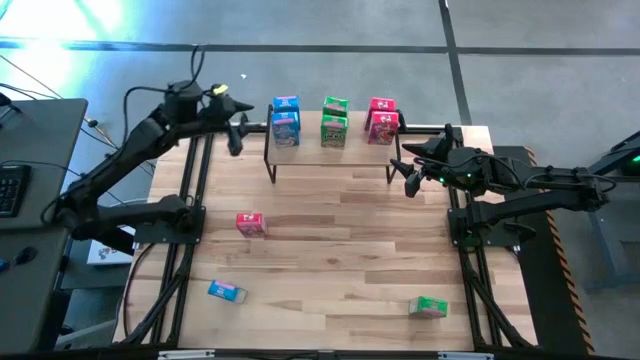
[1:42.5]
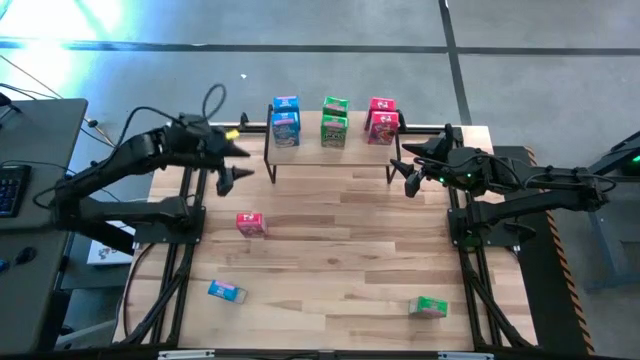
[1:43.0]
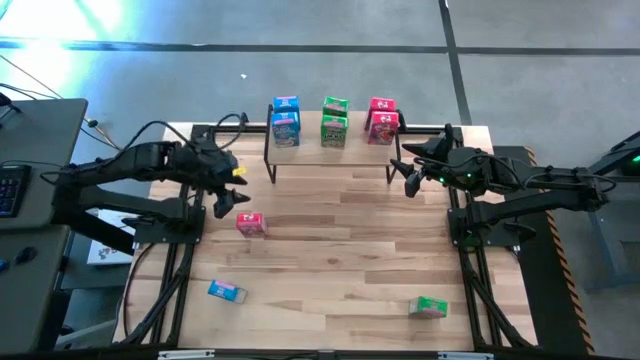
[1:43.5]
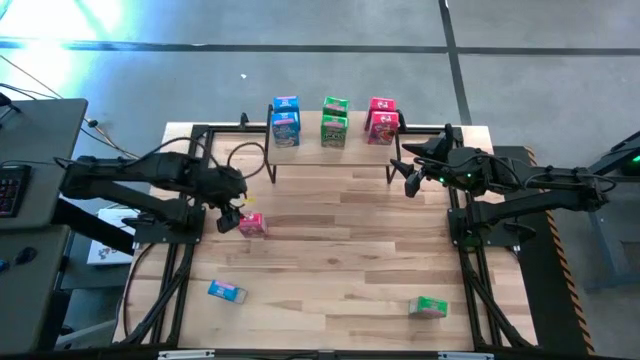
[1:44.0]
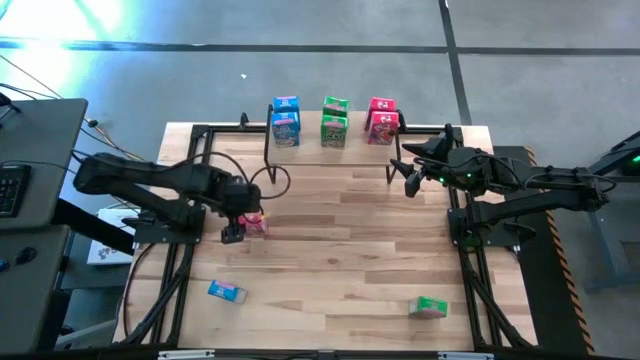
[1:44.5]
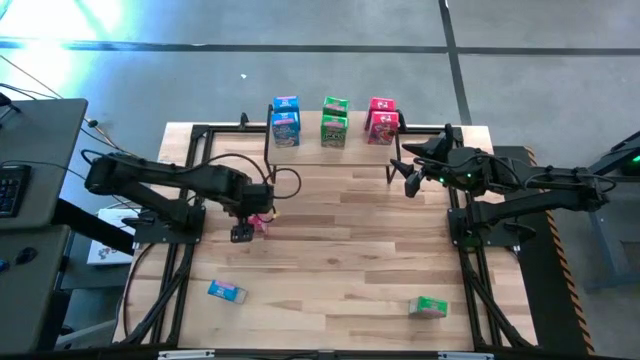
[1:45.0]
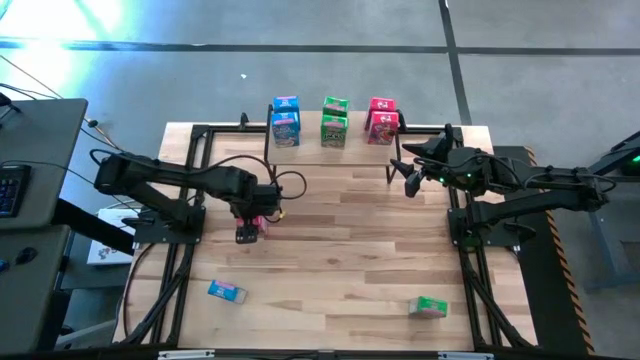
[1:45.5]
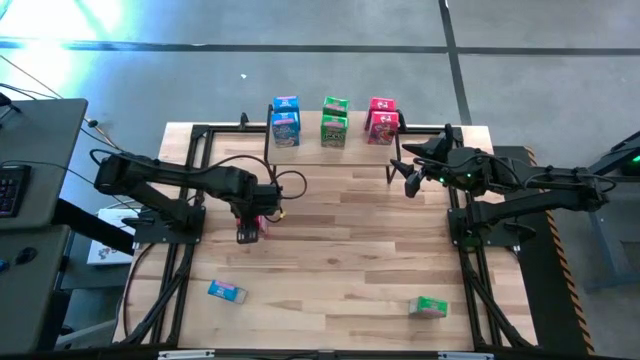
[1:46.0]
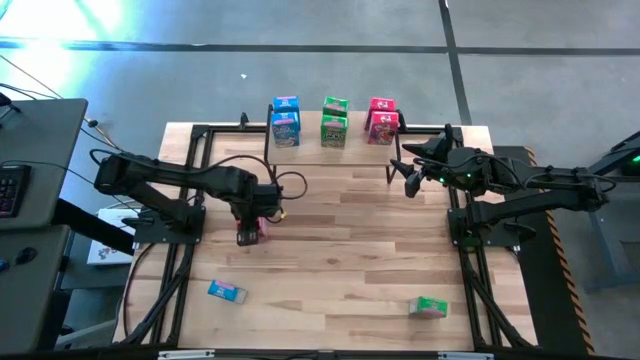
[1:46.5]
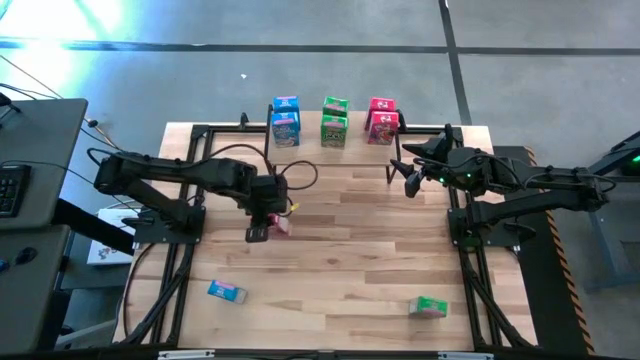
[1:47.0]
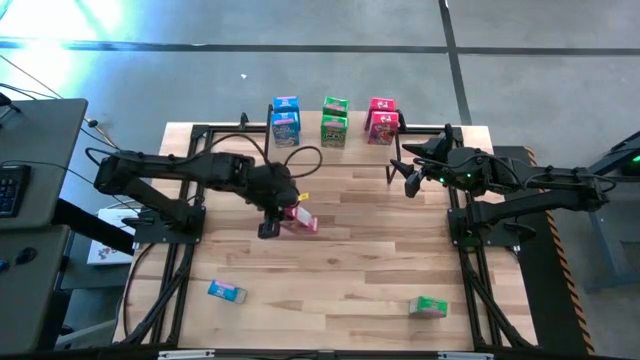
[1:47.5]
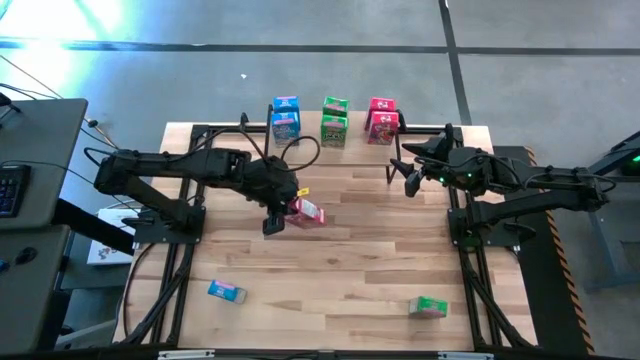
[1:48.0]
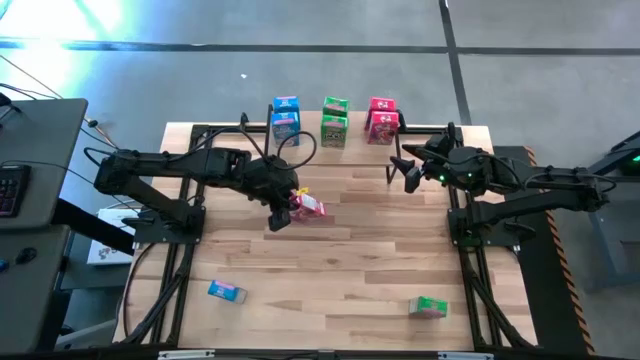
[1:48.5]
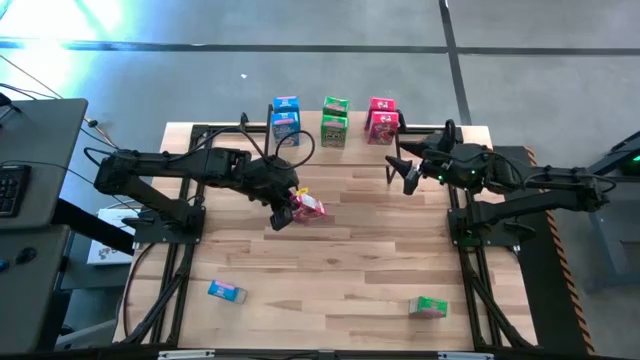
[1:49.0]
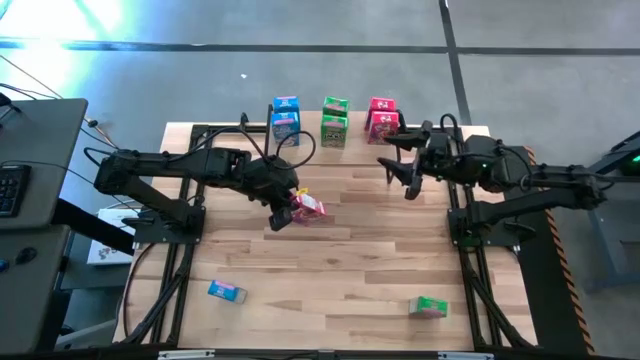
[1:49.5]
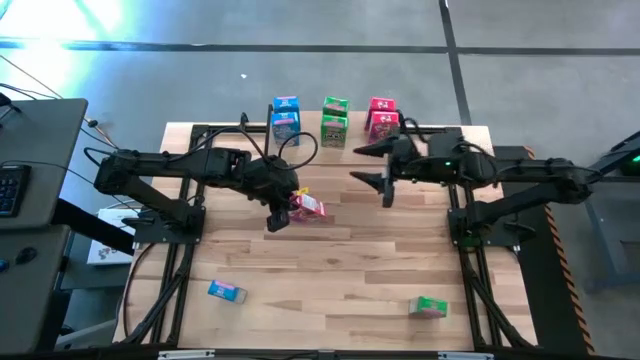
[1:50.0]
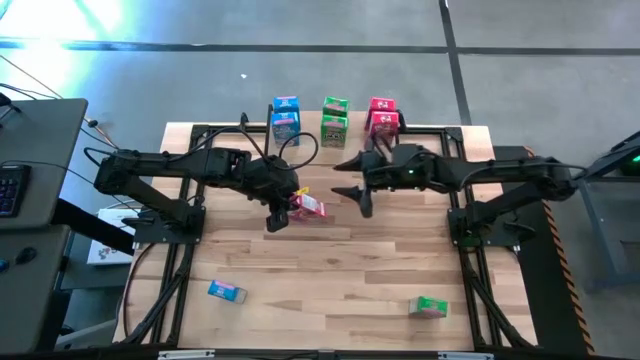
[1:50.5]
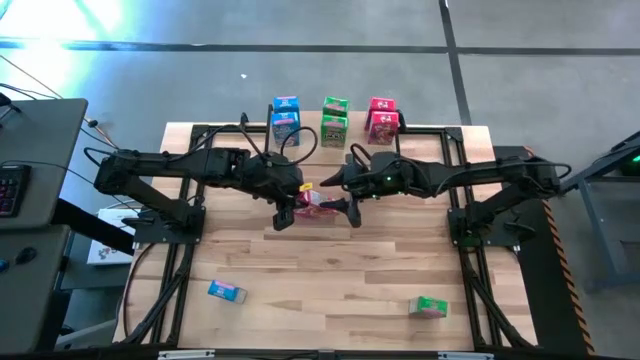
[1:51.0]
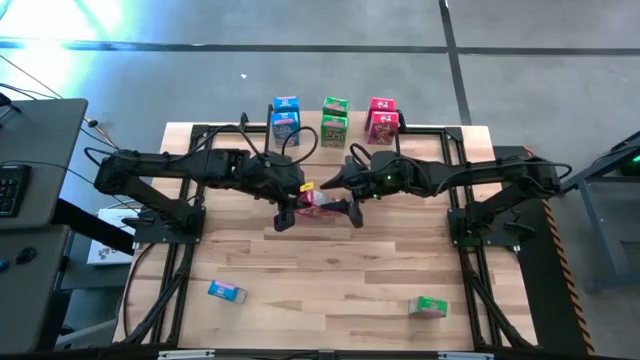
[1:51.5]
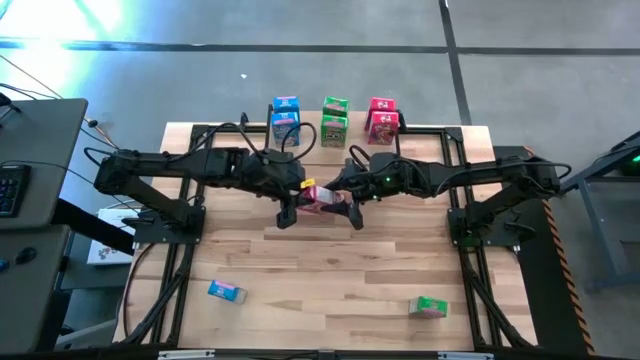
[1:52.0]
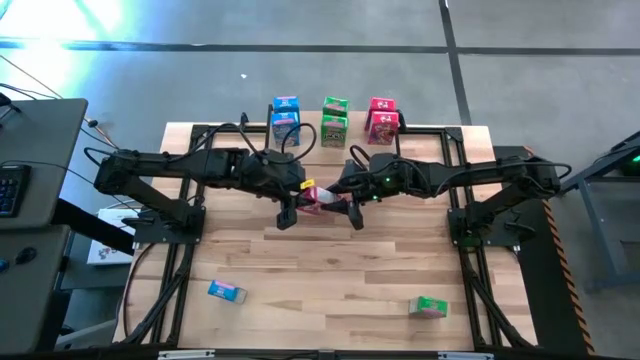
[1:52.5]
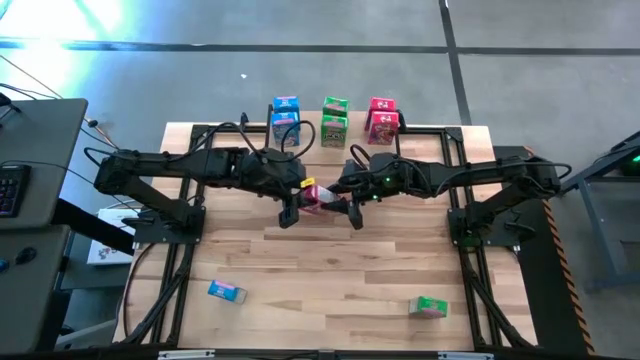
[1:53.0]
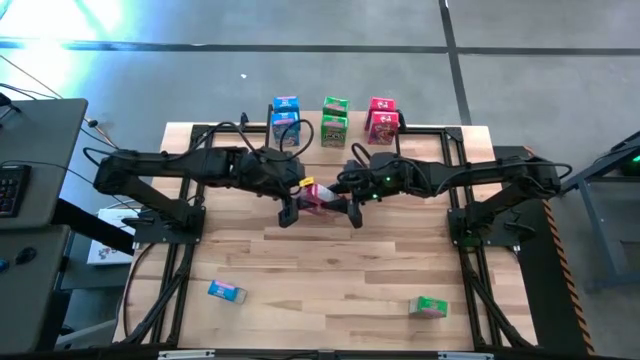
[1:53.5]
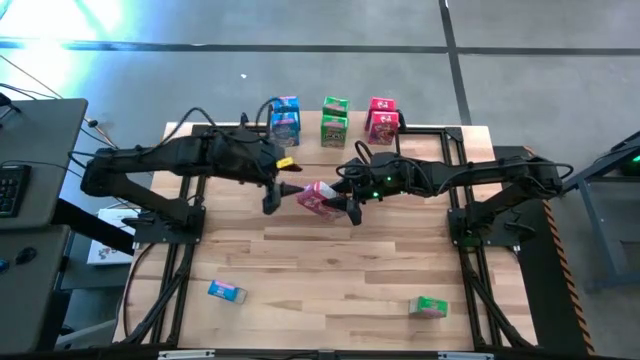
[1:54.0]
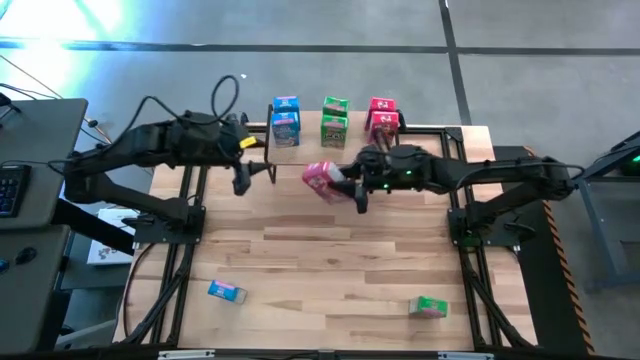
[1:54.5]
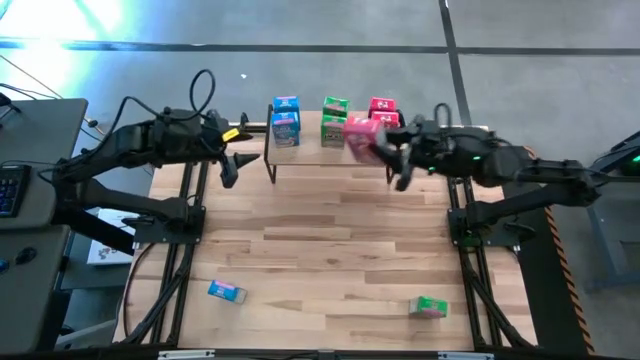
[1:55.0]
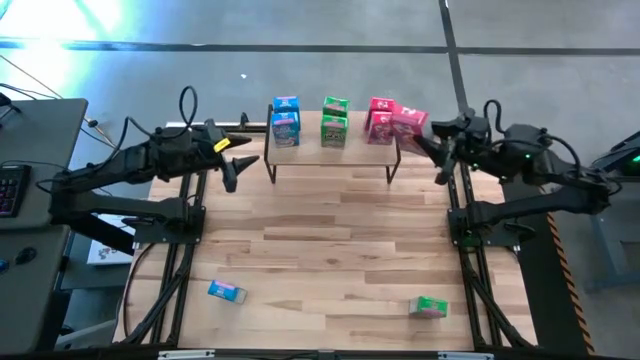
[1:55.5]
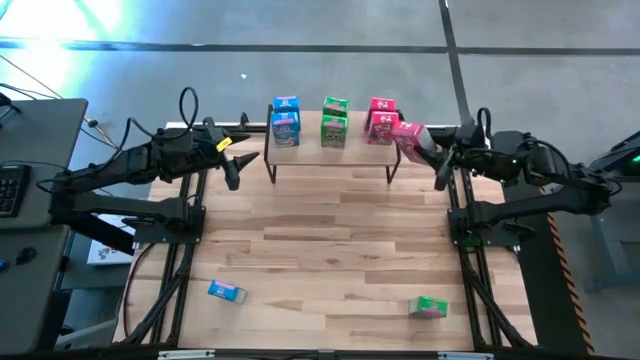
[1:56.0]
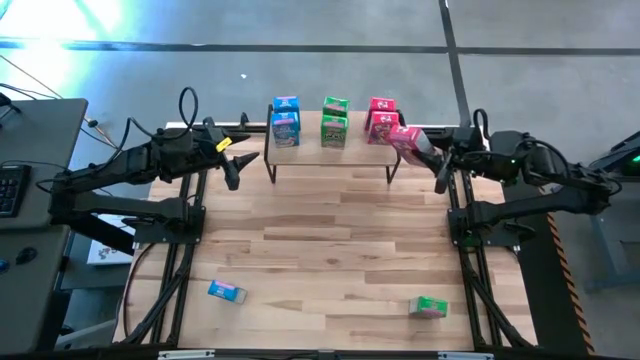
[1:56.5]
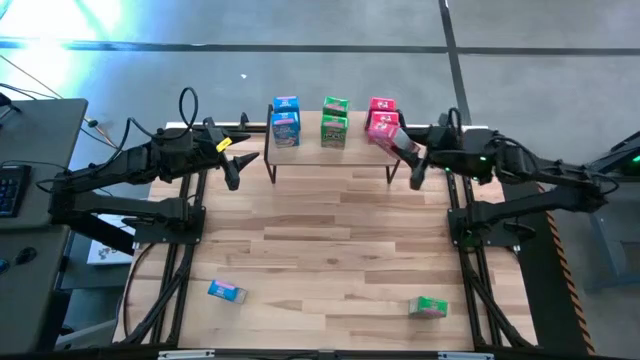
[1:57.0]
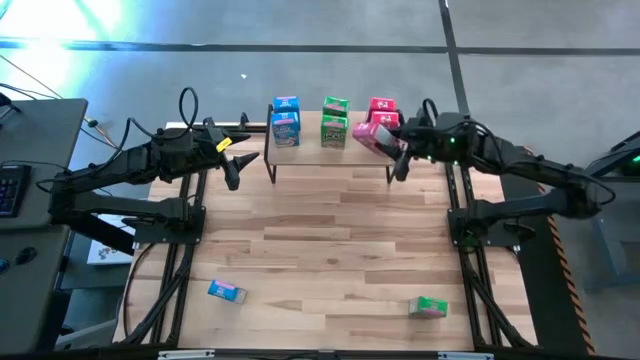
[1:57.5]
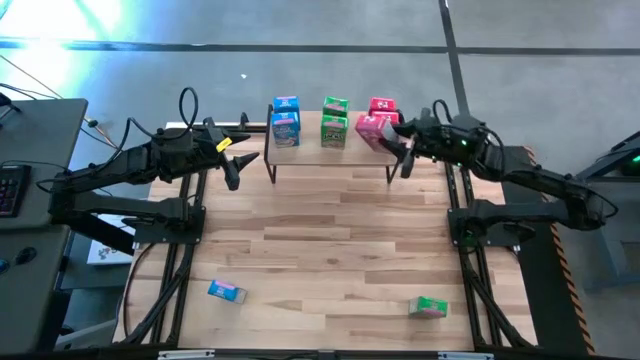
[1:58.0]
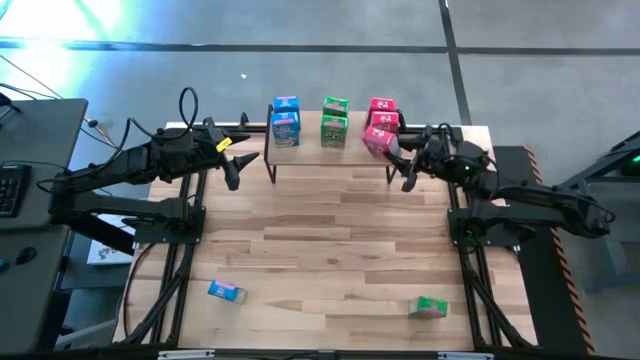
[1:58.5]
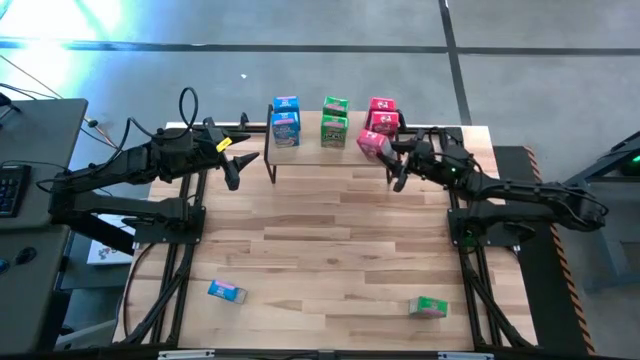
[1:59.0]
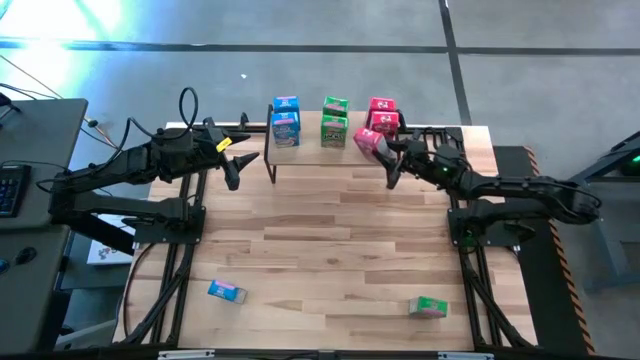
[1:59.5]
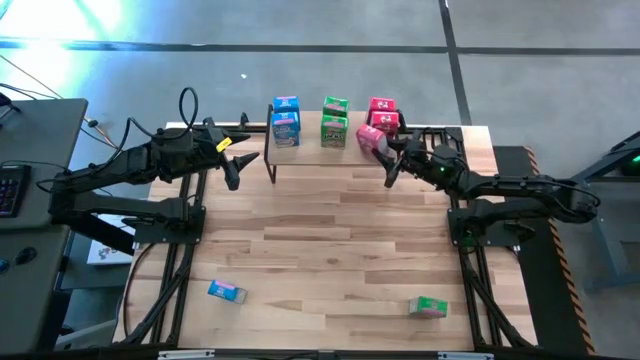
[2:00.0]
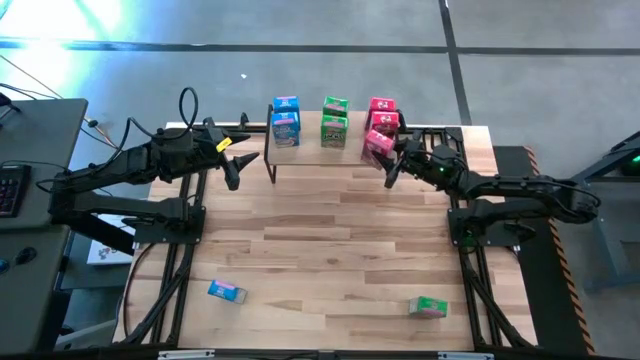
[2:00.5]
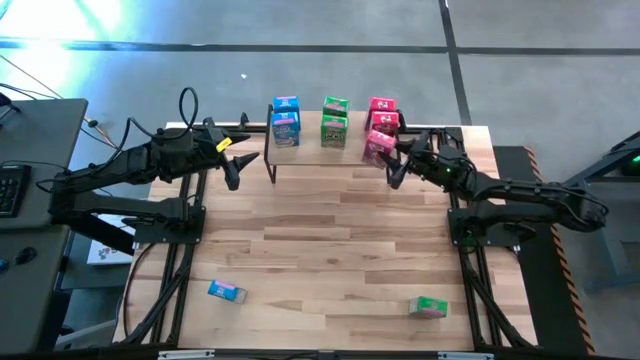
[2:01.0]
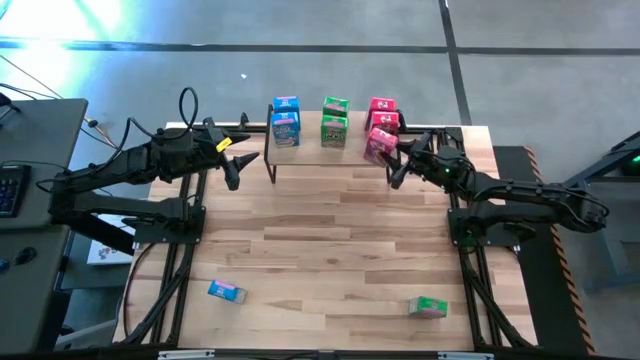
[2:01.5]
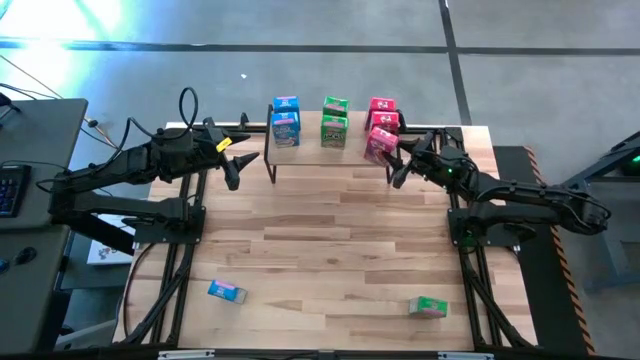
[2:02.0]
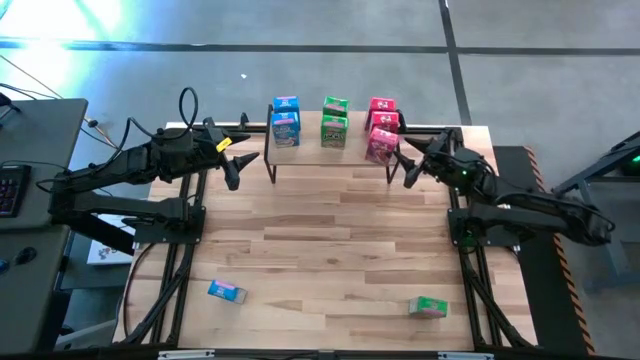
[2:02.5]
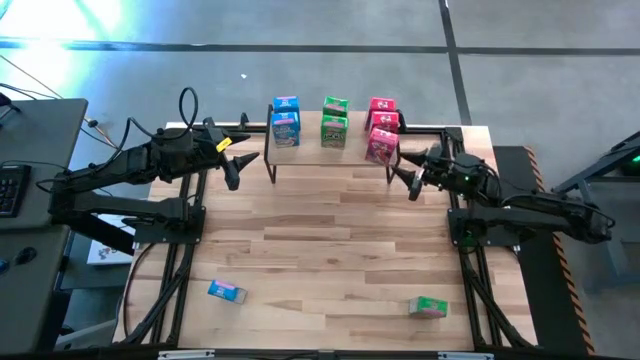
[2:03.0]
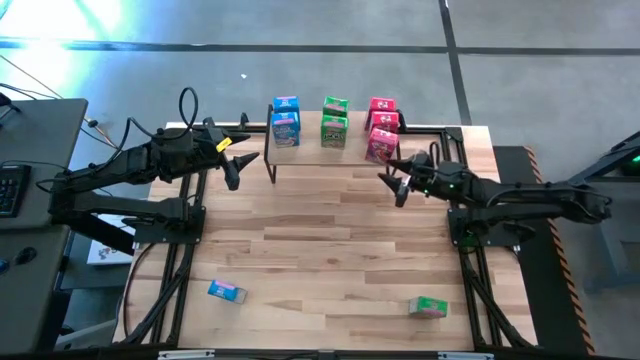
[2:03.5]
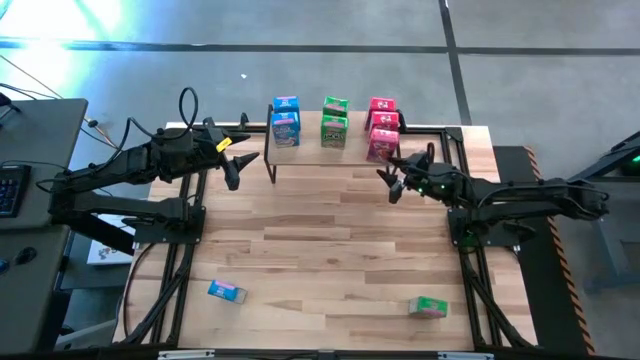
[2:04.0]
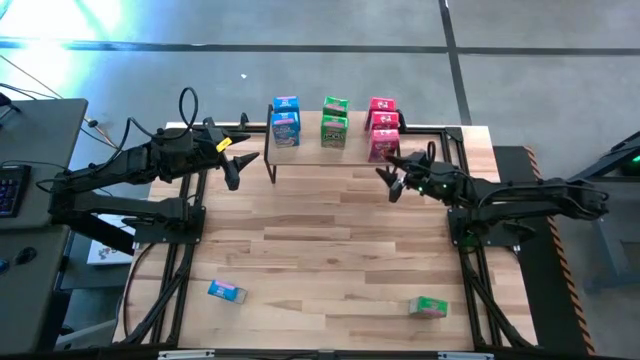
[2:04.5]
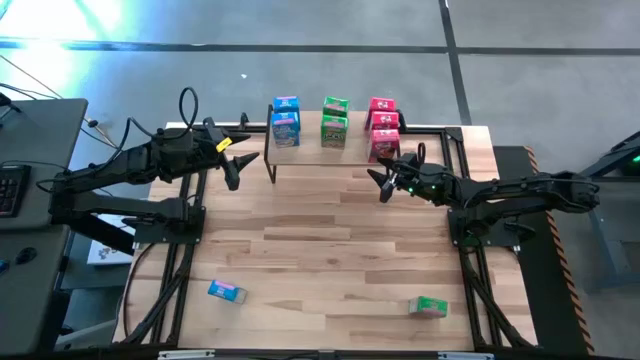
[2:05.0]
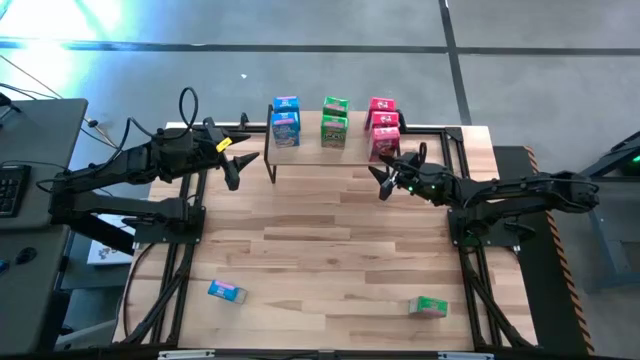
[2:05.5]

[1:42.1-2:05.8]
Task: Stack cereal on shelf
Put the red cereal box aligned with the other red cereal boxes on the shelf
